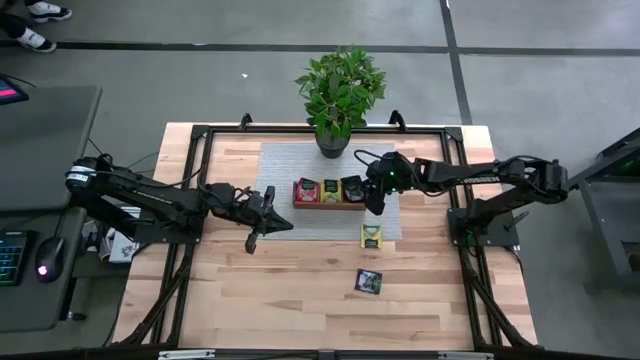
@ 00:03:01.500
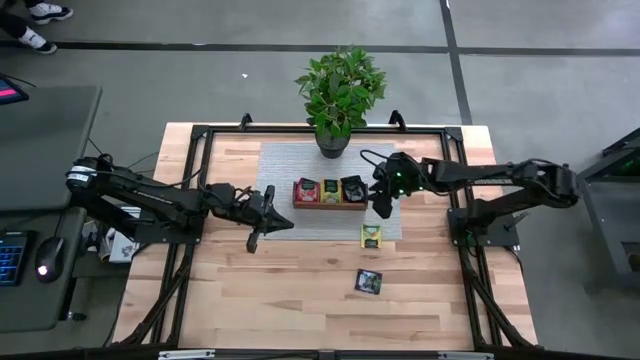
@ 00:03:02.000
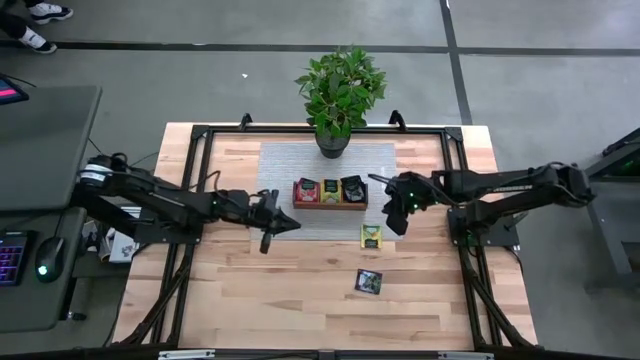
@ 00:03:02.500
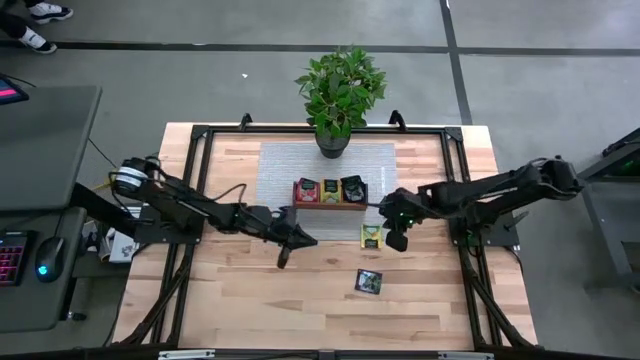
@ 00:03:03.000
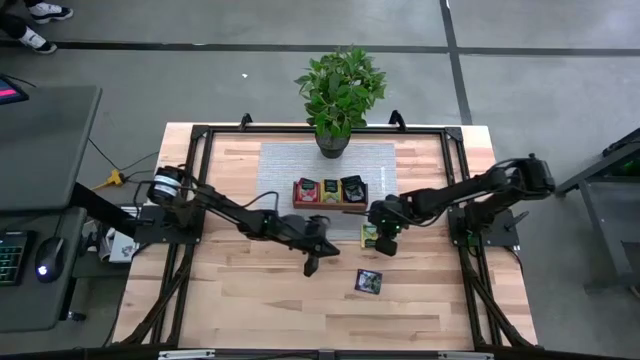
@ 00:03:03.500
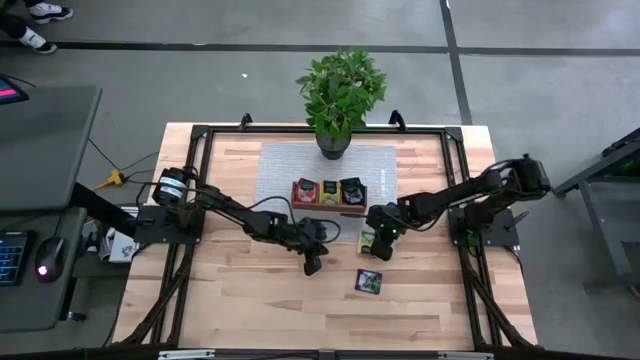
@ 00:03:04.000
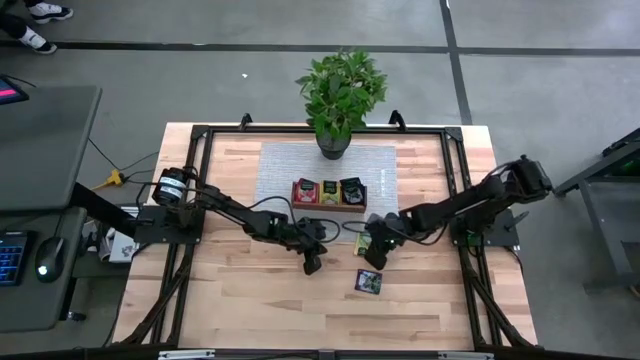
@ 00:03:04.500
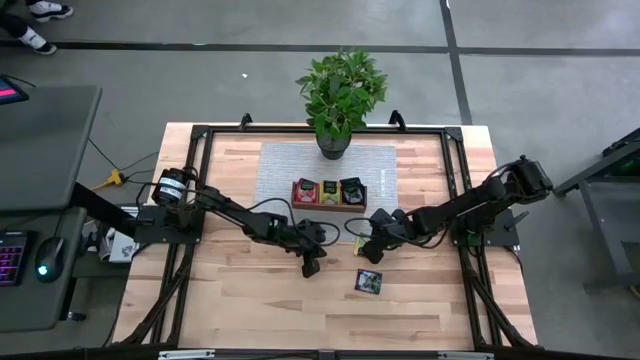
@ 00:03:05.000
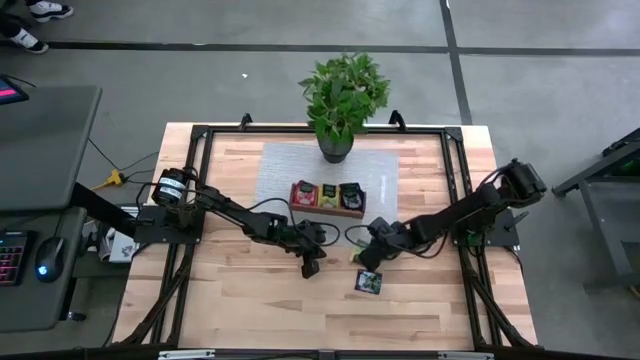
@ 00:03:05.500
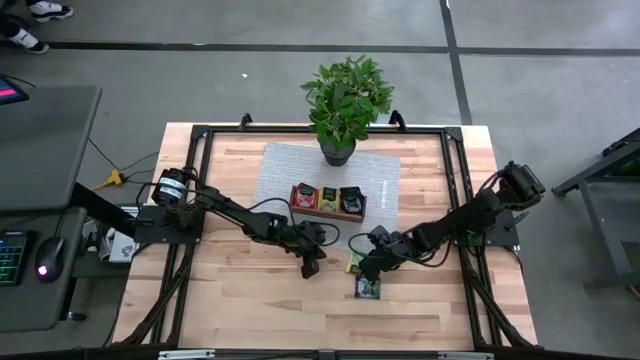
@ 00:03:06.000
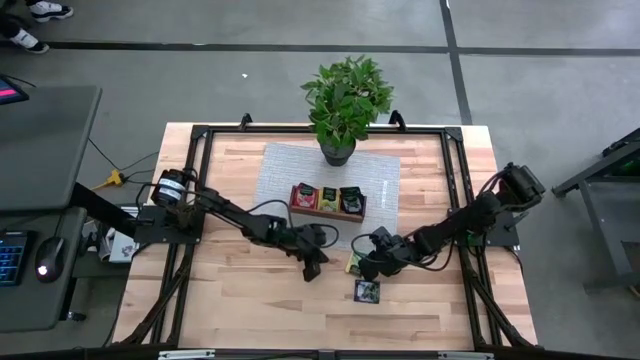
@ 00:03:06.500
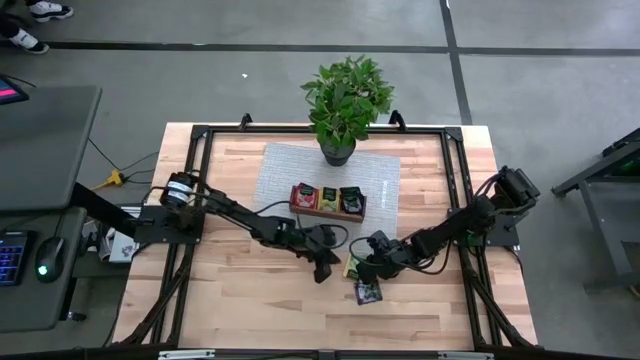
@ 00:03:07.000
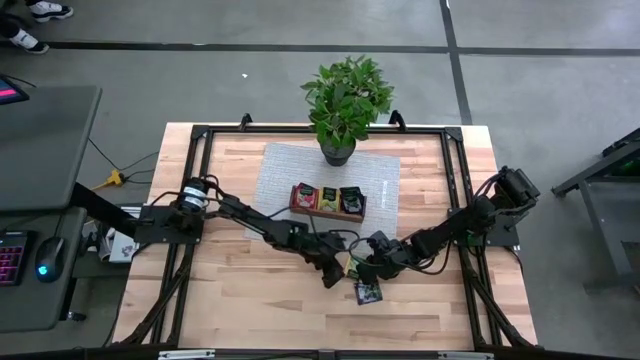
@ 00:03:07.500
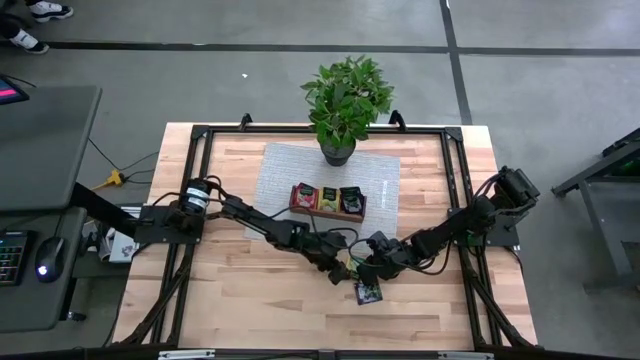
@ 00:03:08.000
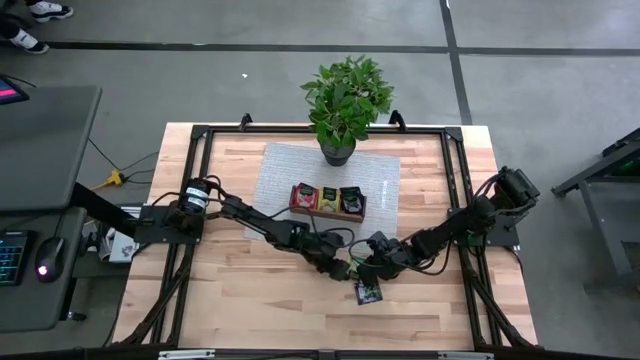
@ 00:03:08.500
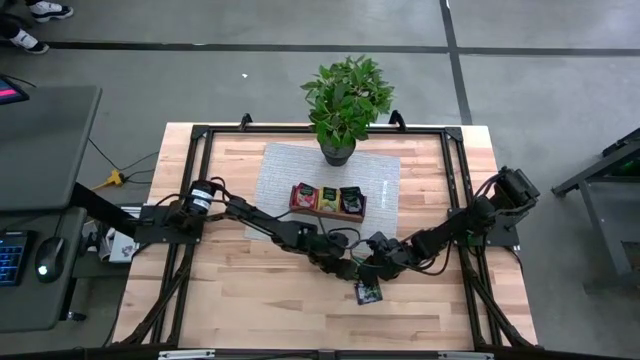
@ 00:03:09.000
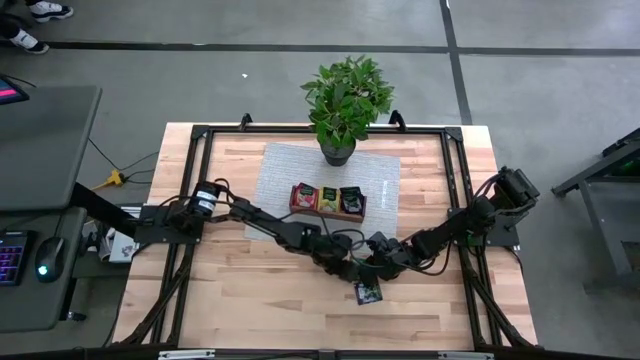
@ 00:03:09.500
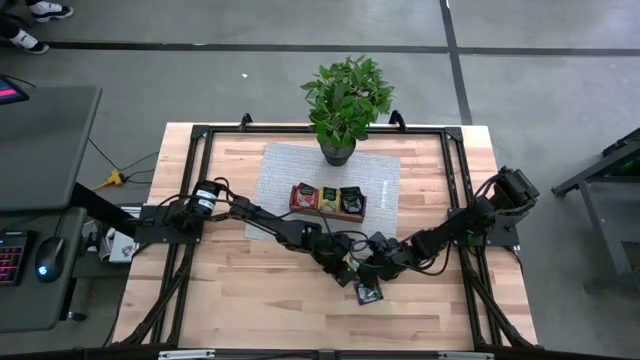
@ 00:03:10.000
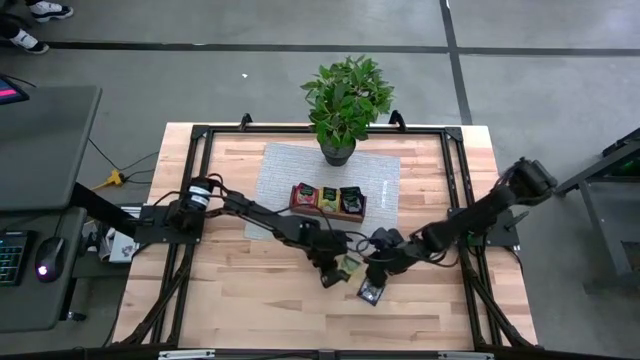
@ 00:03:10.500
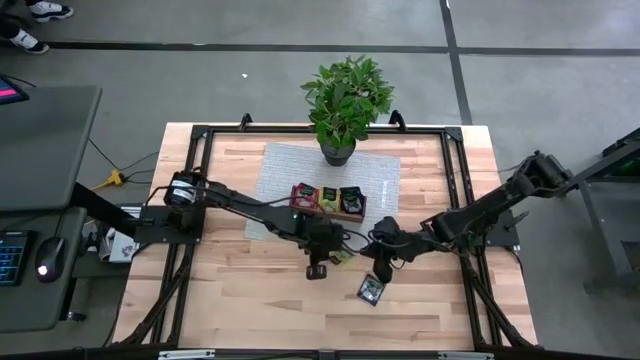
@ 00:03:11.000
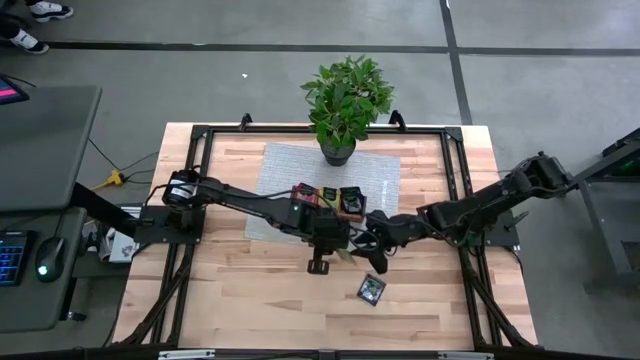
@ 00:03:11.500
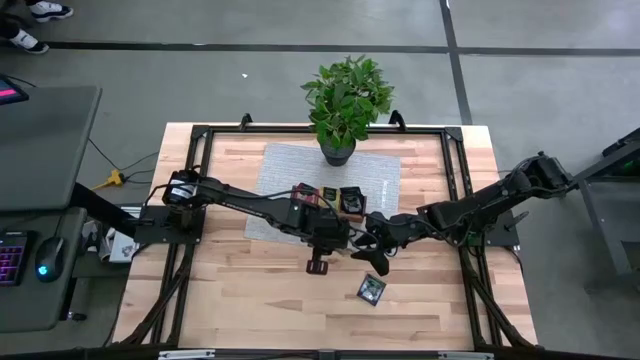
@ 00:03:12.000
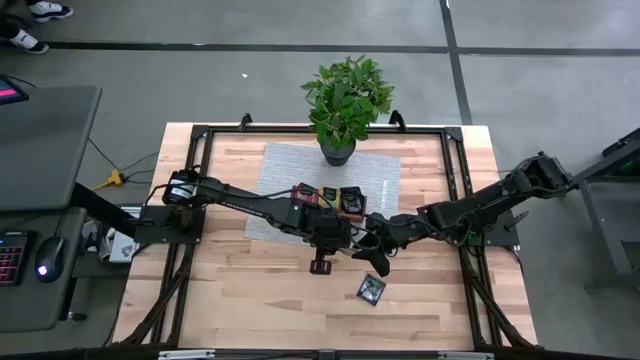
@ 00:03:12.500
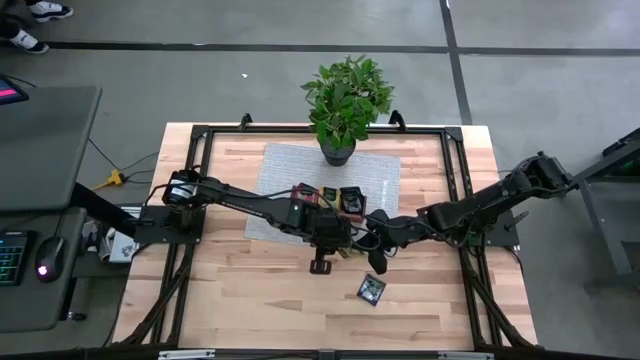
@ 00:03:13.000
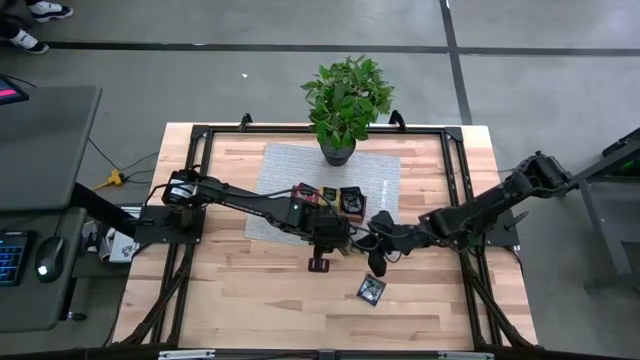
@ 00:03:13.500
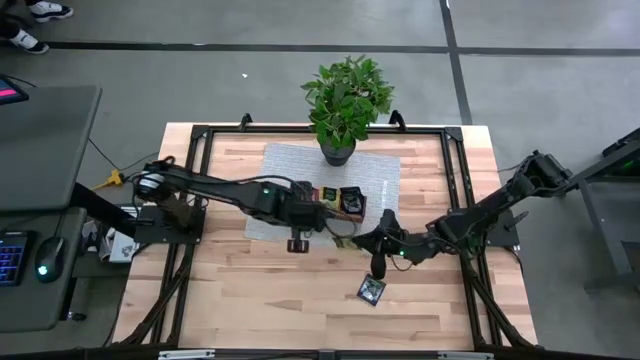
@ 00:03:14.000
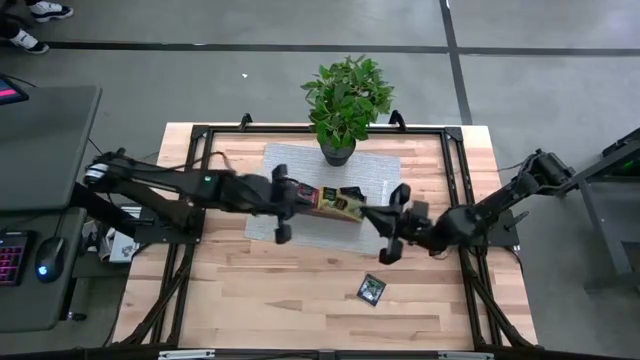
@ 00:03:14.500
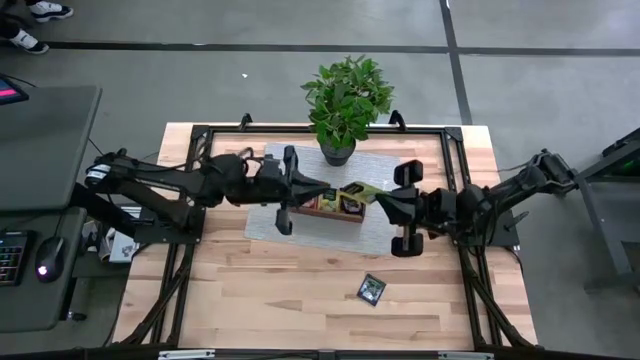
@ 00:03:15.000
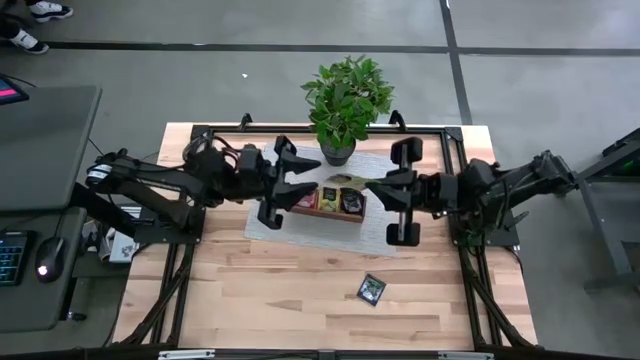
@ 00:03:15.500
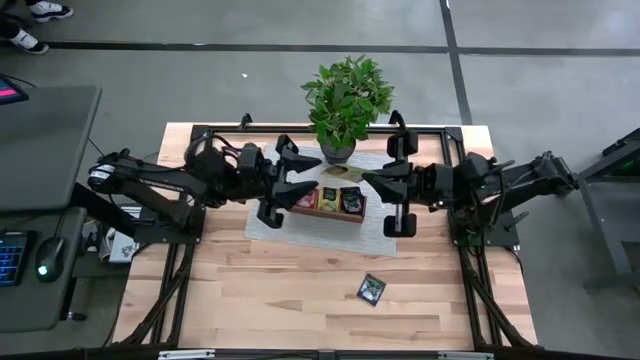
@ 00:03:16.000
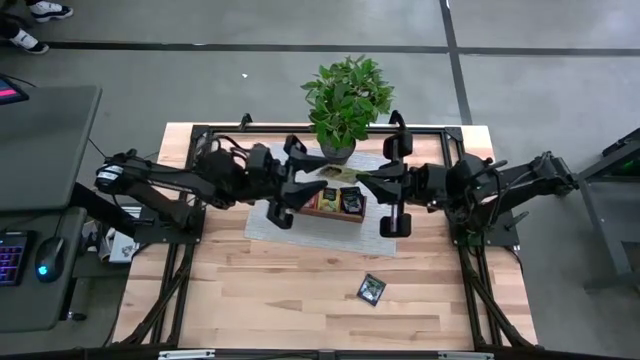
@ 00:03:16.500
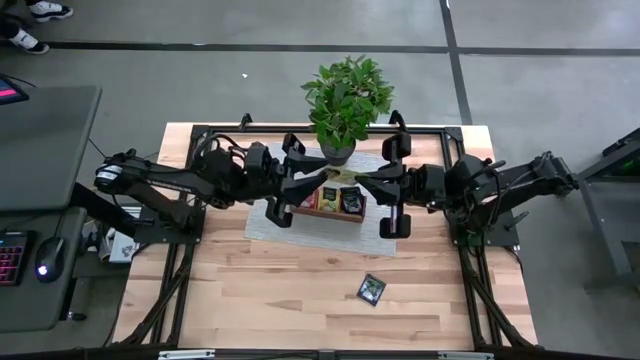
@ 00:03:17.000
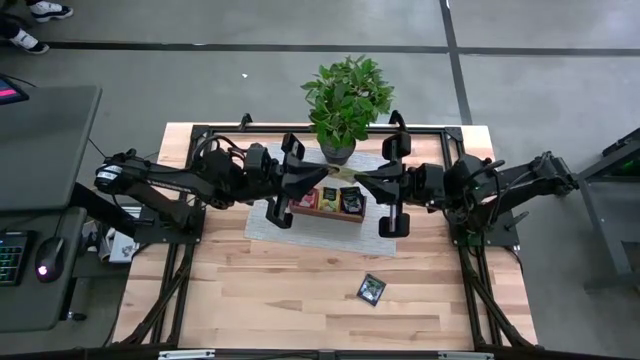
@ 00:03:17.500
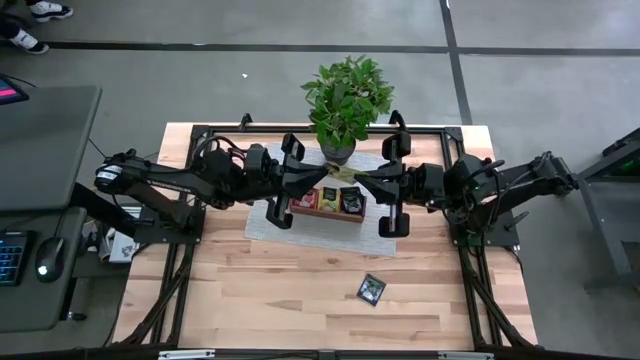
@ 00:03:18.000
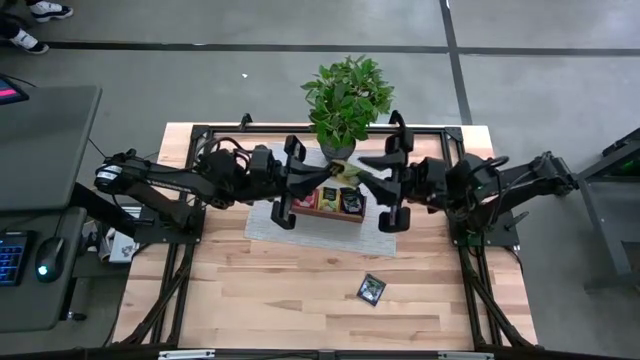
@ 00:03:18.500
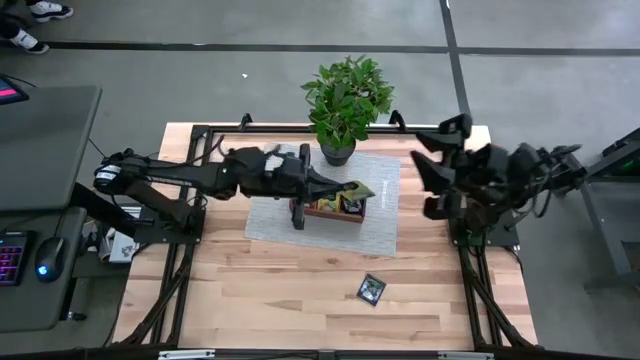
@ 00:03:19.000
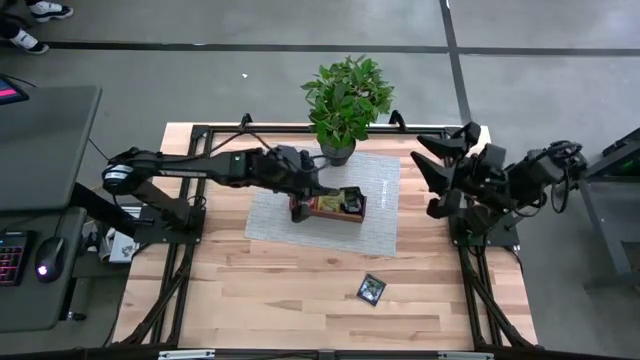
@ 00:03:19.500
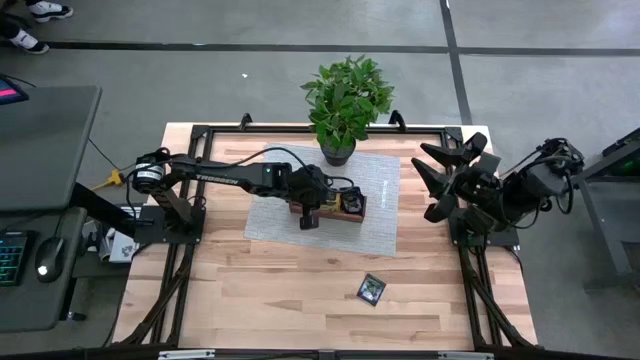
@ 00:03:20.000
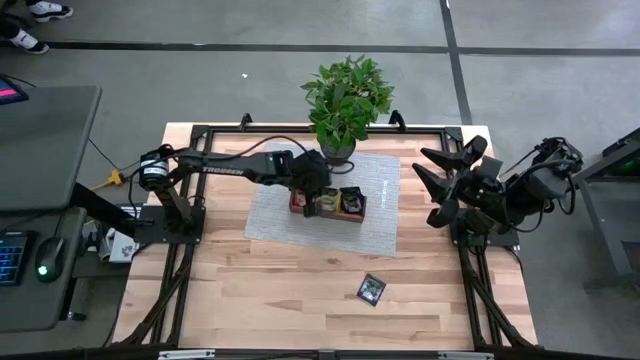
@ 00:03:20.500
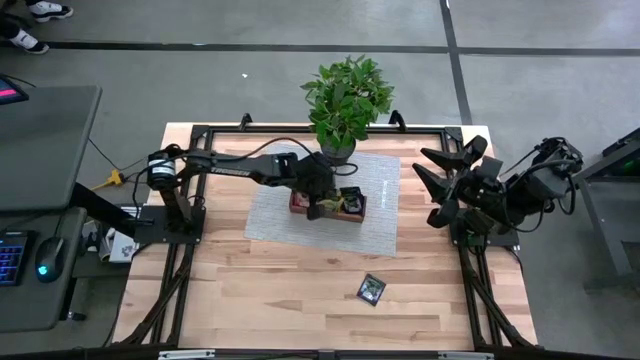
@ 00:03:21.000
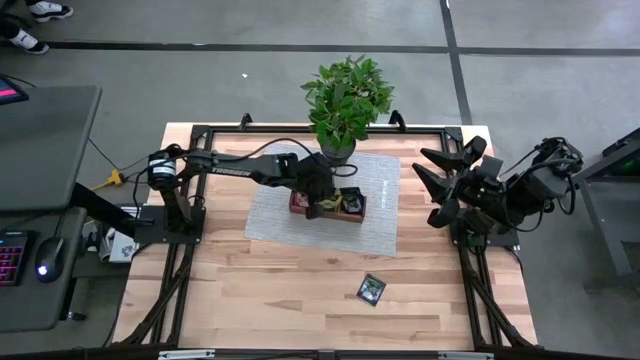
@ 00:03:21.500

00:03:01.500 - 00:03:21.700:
Task: Pick & Place Tea
Put the yellow tea bag into the middle section of the wooden organizer
